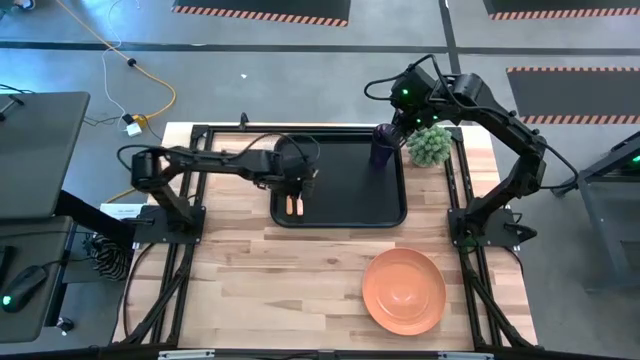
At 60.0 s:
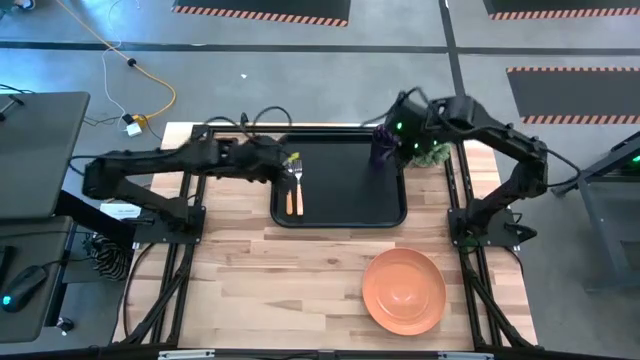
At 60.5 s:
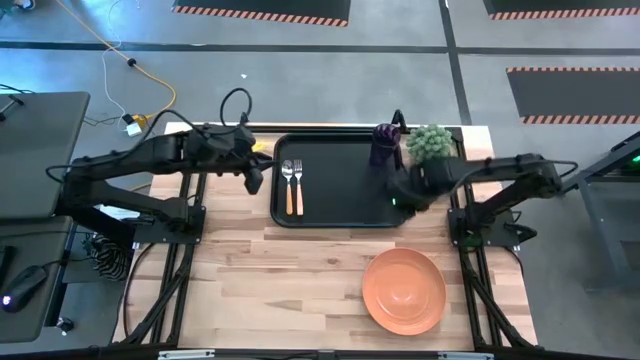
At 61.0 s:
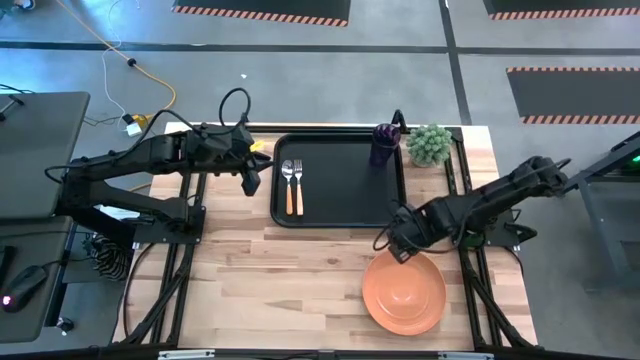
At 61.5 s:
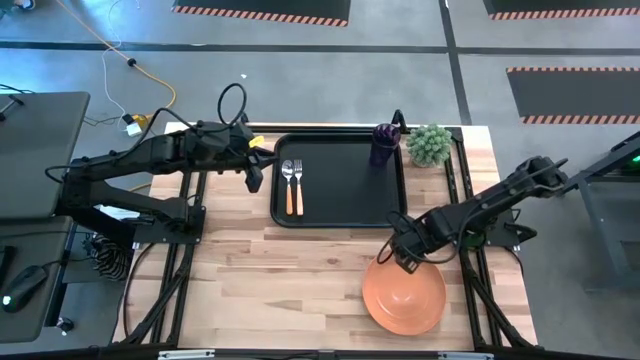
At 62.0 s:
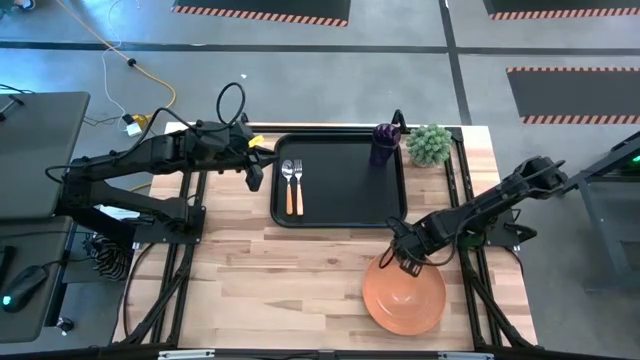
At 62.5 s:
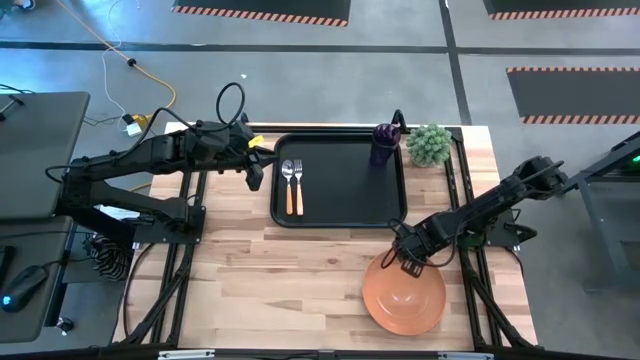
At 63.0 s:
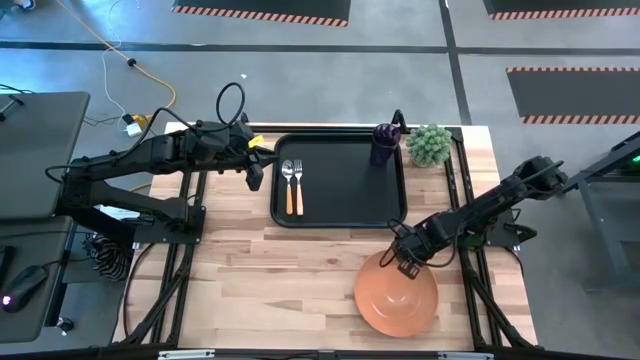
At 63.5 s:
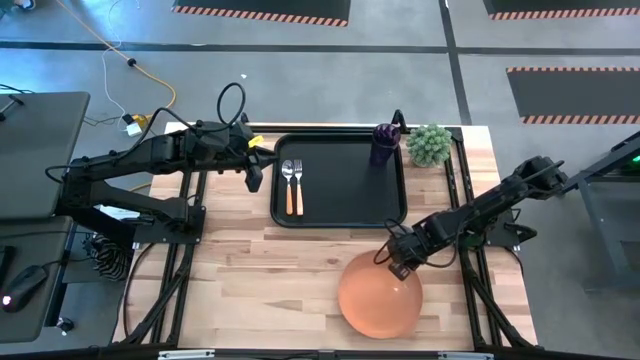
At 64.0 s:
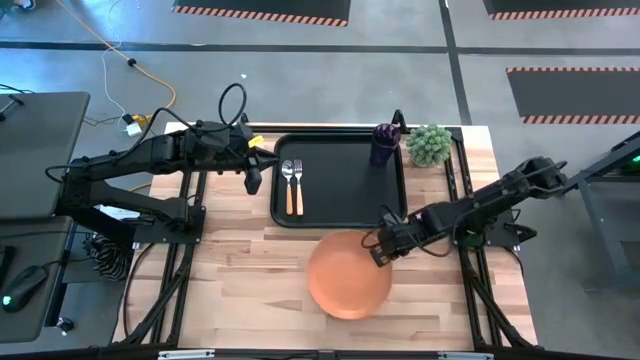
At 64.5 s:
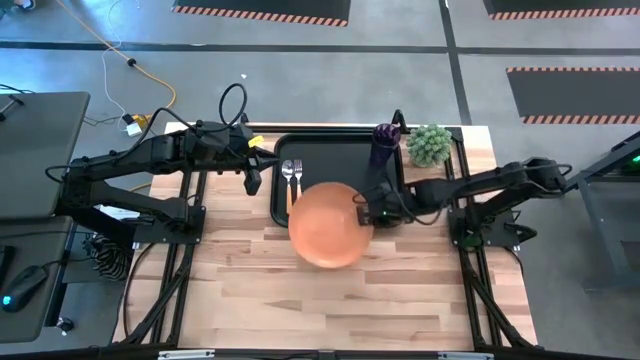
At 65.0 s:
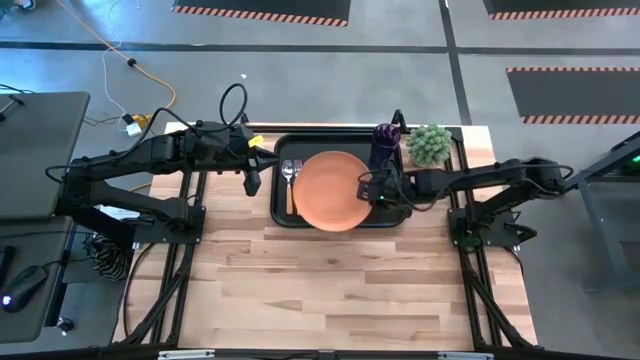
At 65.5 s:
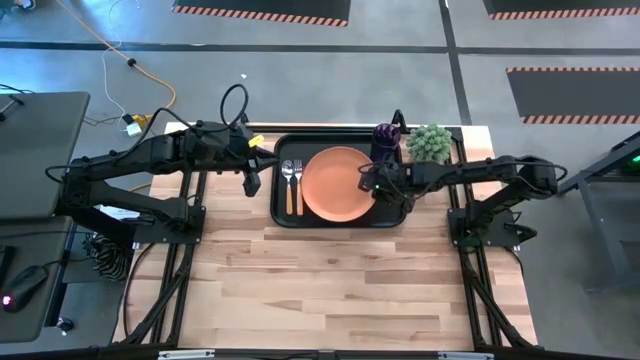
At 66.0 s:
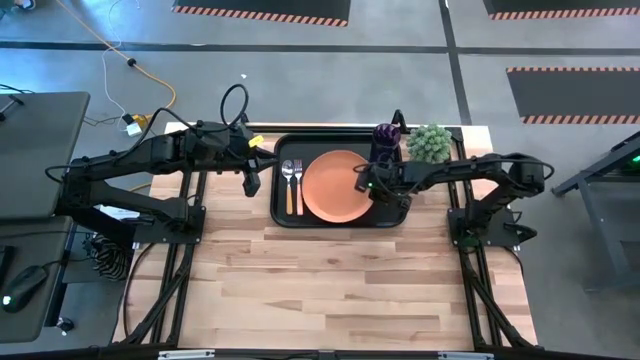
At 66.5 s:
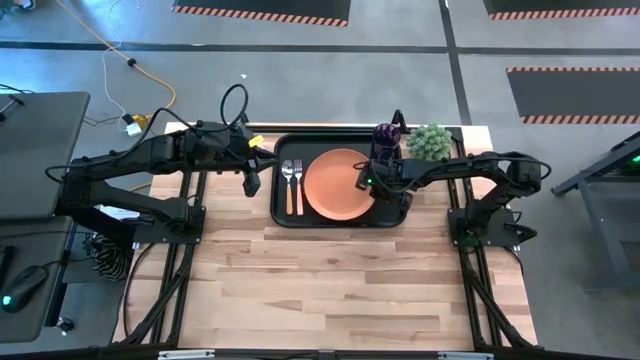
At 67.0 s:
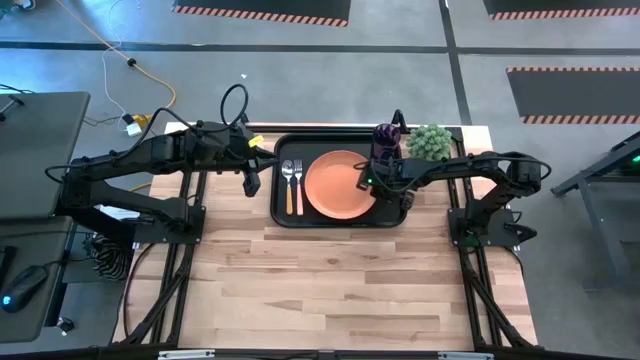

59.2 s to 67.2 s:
Task: Pick and place plate/cup/fork/spoon on tray
Put the orange plate on the black serving tray to the bottom left of the purple glass

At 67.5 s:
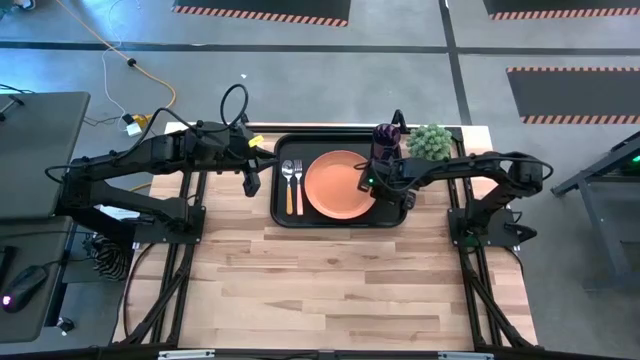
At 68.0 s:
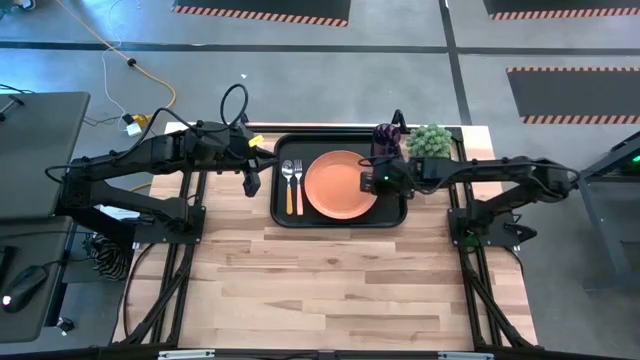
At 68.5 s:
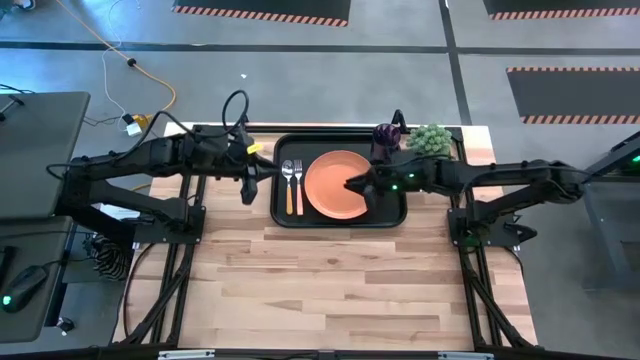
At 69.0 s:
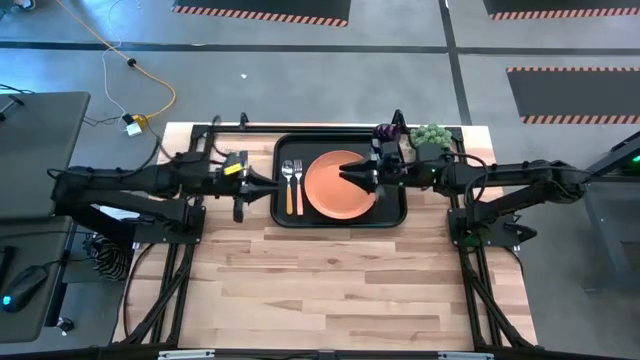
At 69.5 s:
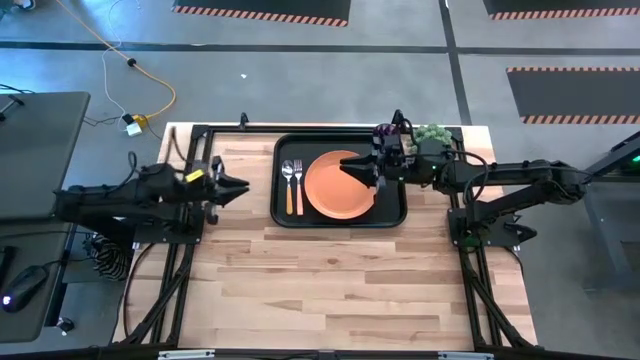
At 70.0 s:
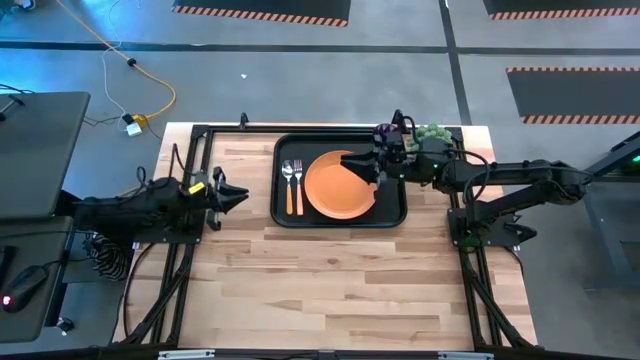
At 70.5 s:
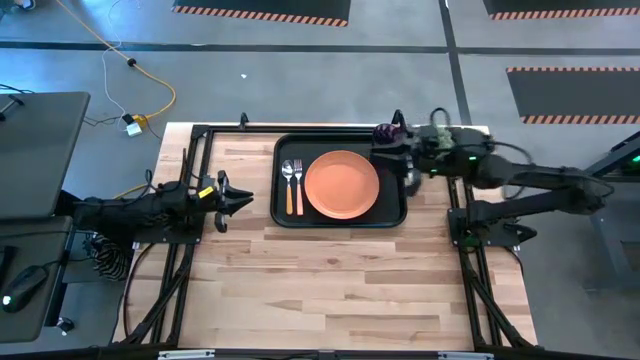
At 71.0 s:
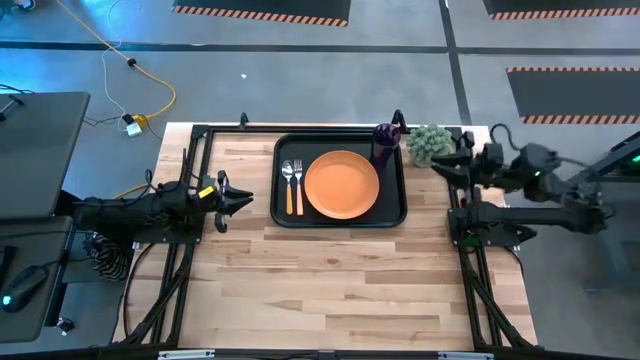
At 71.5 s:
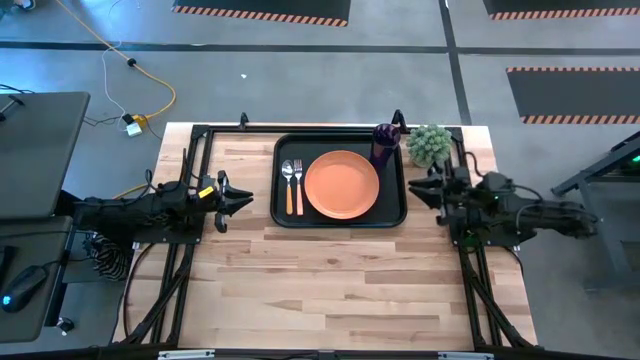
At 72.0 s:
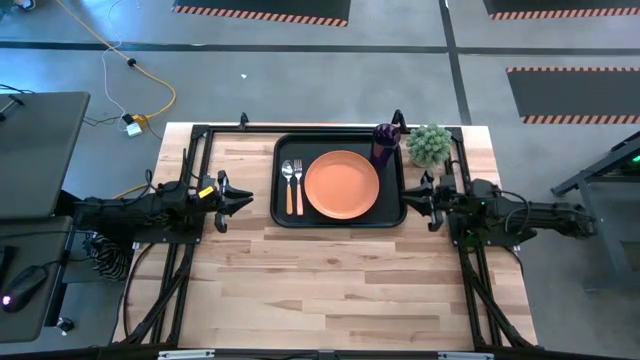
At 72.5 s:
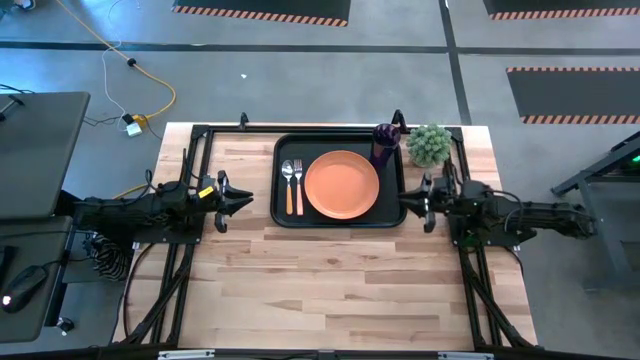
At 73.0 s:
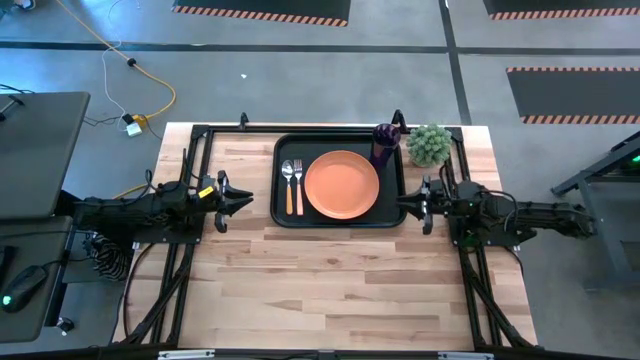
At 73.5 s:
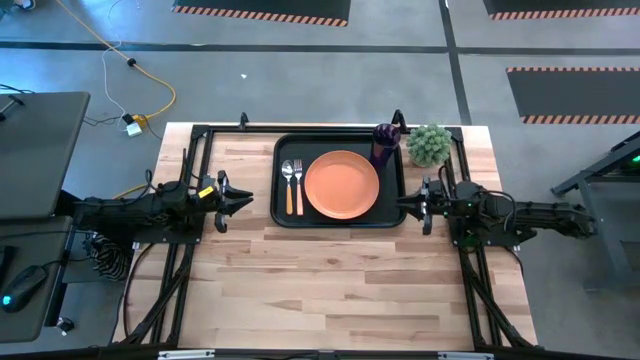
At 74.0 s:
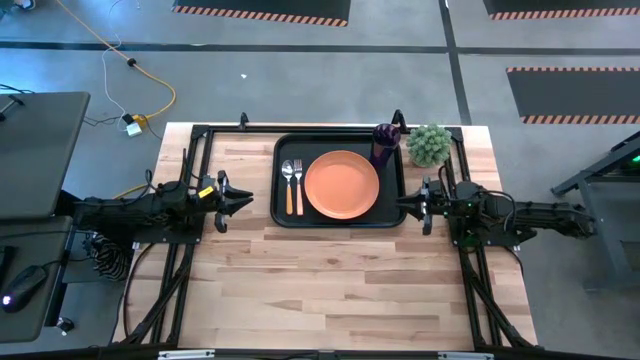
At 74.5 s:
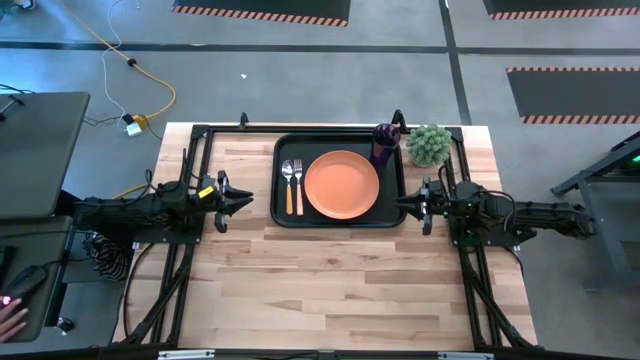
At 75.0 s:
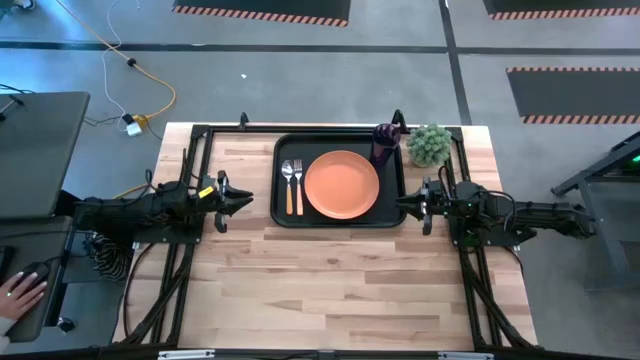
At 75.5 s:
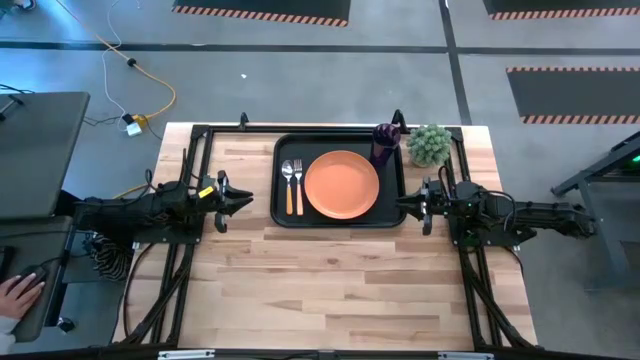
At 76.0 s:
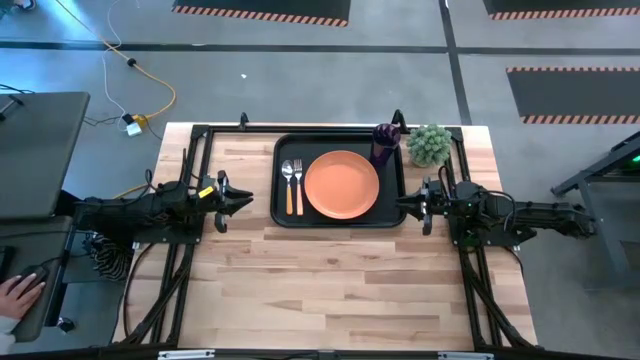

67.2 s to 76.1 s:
Return to Home Position

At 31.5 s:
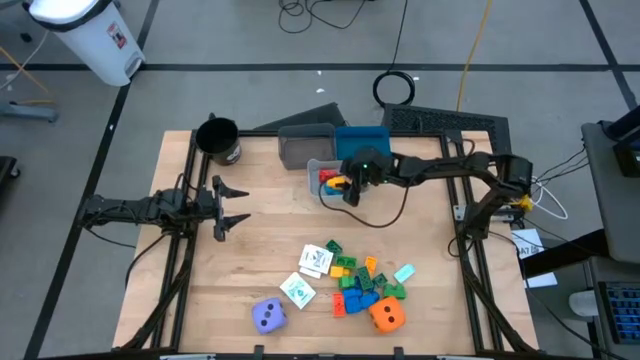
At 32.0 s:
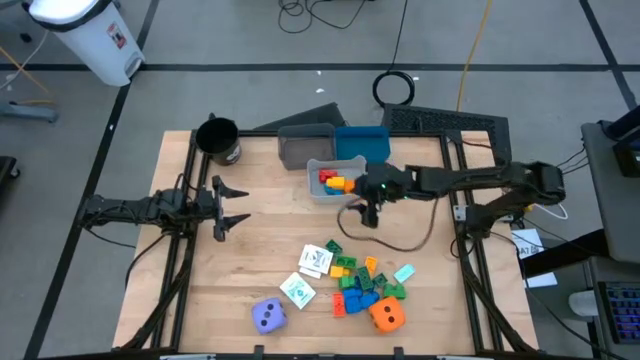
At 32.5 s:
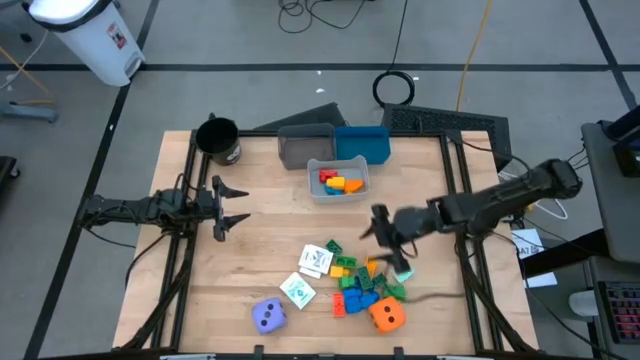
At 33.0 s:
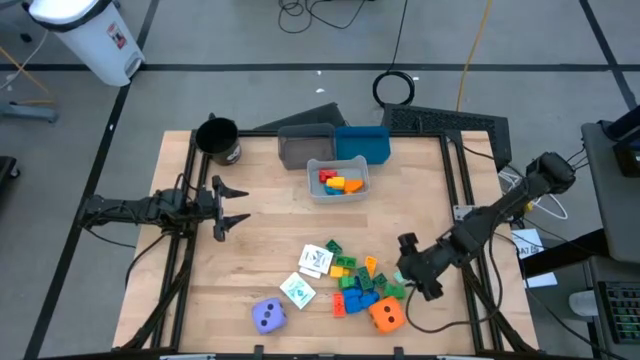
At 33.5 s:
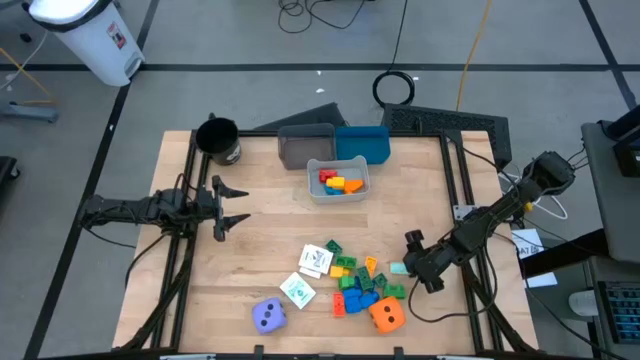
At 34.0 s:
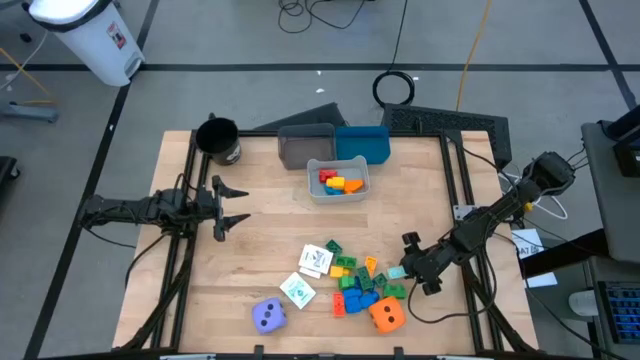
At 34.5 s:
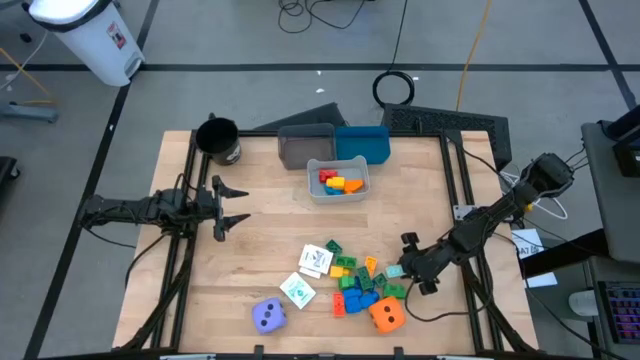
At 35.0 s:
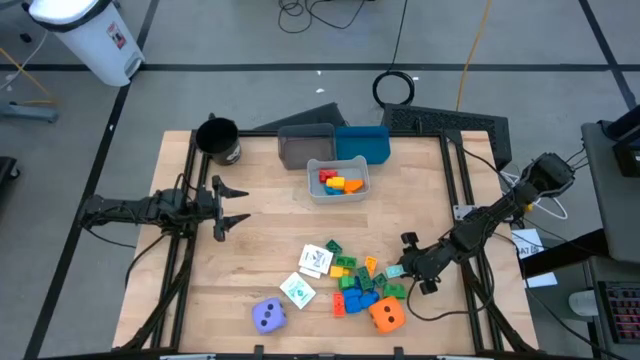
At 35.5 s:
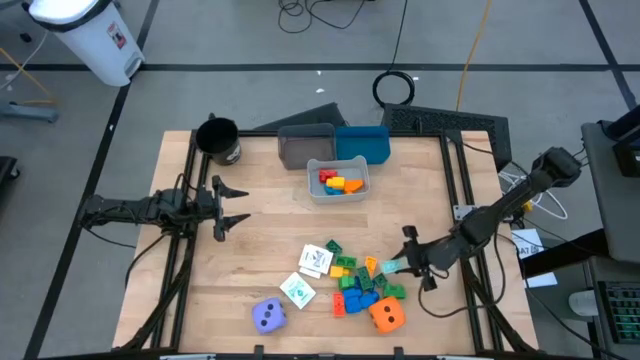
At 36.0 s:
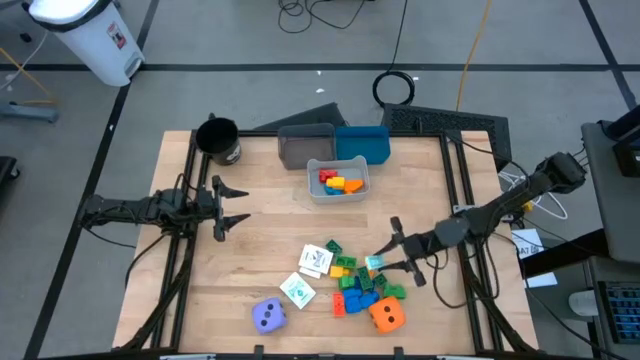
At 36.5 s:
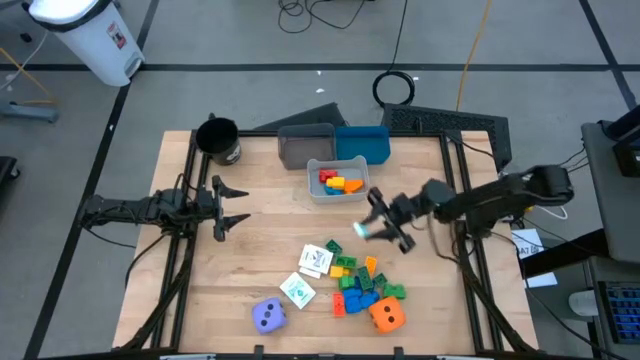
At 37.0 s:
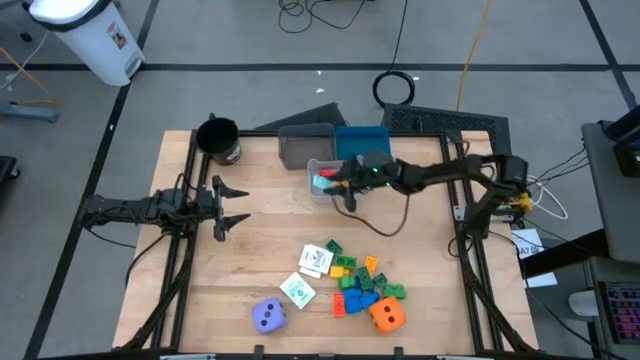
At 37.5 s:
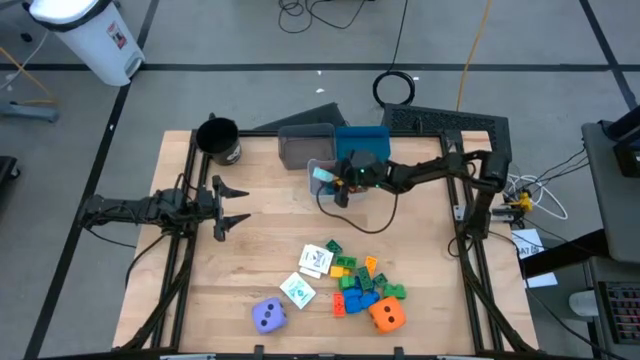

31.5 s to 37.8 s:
Task: Pick & Place Toys
Put the light blue game piece into the gray bin
